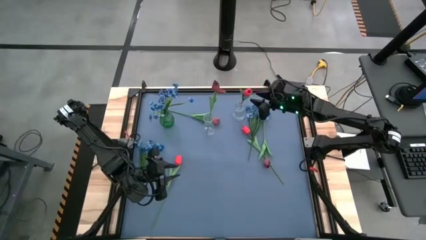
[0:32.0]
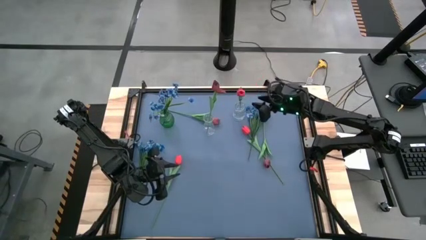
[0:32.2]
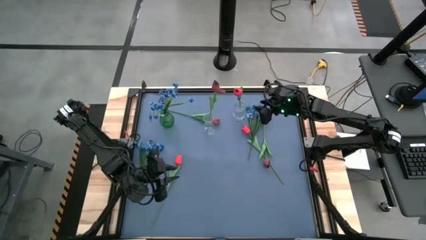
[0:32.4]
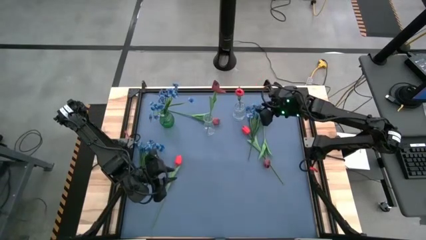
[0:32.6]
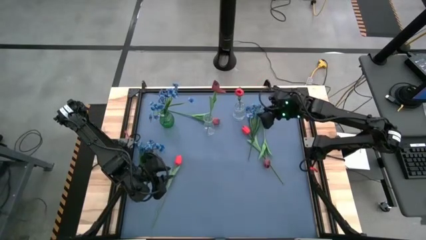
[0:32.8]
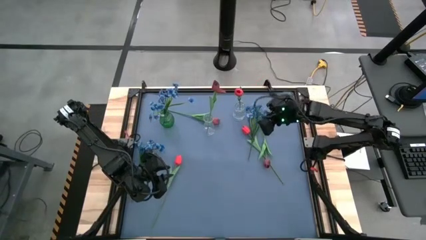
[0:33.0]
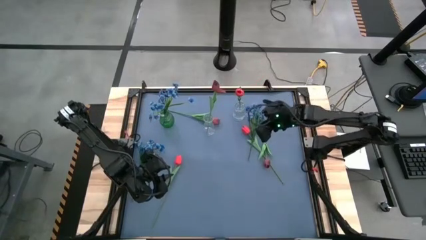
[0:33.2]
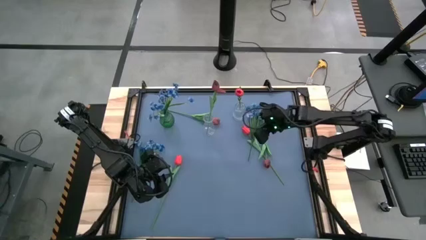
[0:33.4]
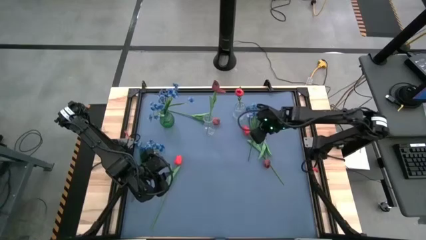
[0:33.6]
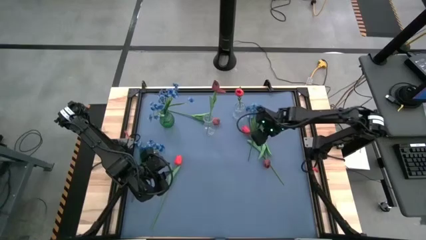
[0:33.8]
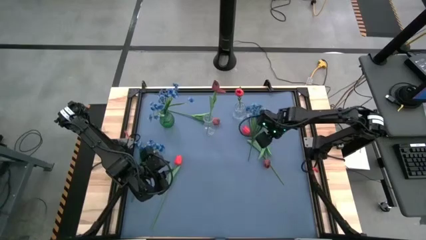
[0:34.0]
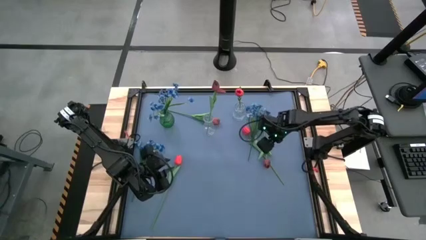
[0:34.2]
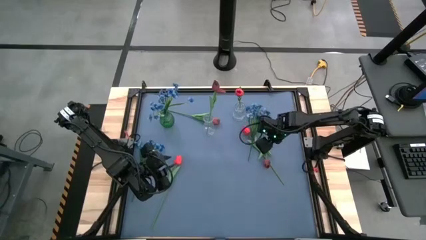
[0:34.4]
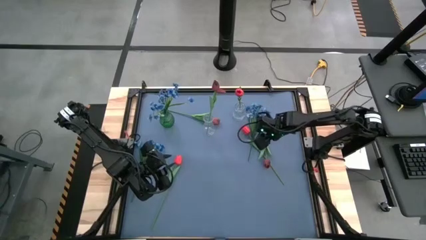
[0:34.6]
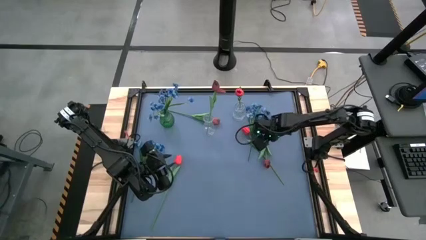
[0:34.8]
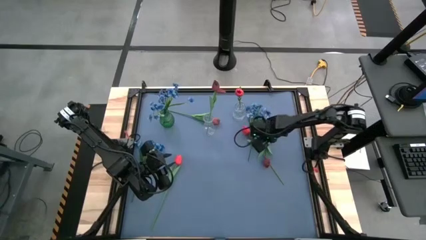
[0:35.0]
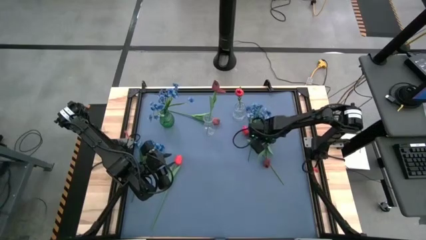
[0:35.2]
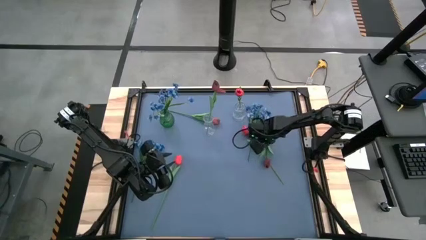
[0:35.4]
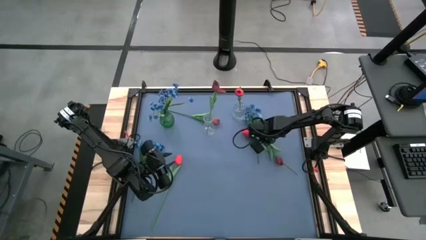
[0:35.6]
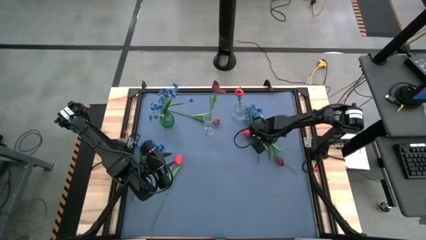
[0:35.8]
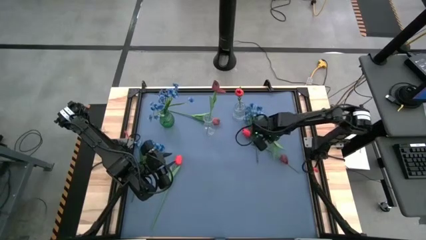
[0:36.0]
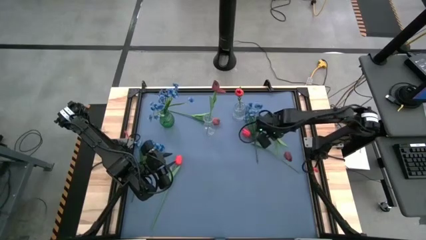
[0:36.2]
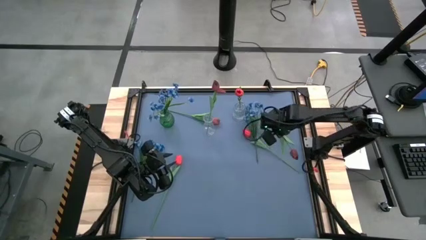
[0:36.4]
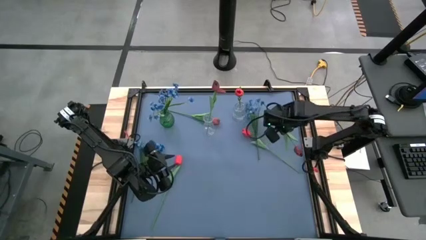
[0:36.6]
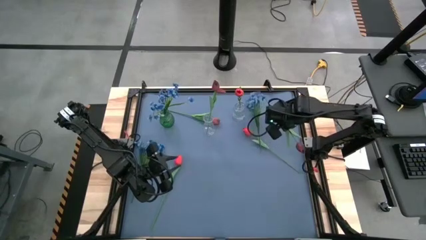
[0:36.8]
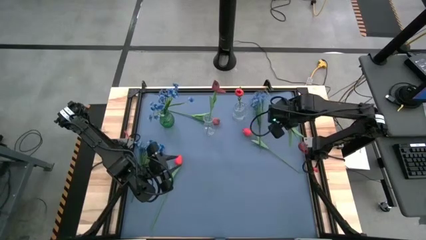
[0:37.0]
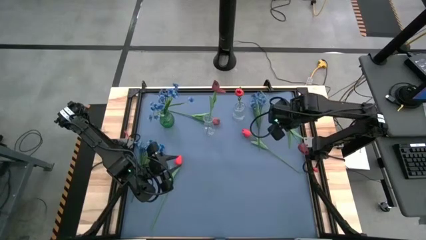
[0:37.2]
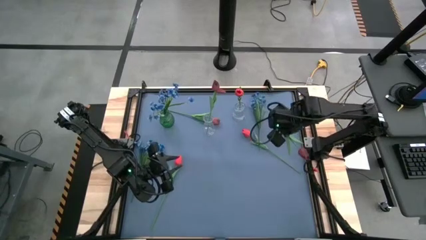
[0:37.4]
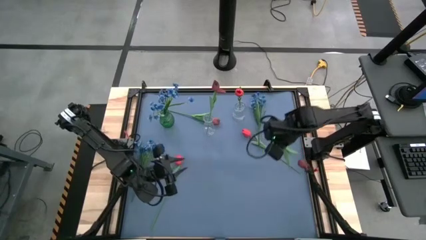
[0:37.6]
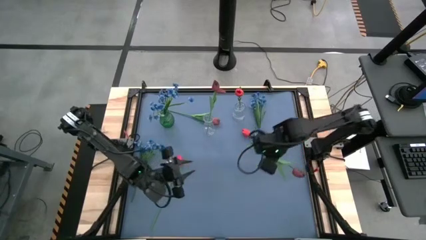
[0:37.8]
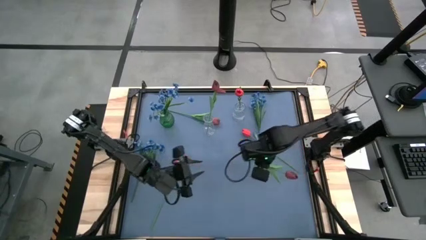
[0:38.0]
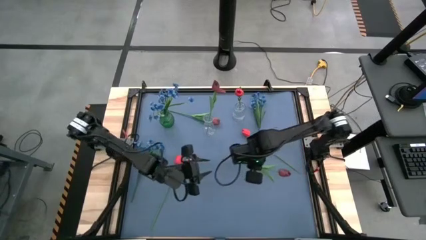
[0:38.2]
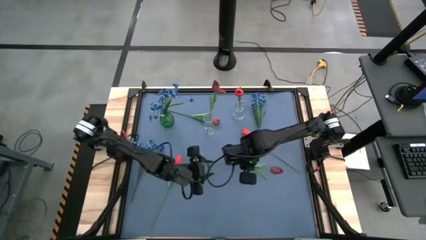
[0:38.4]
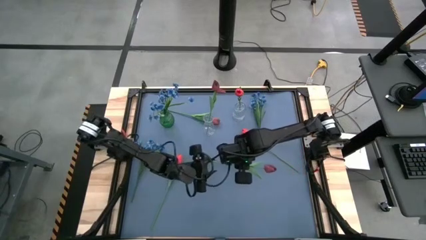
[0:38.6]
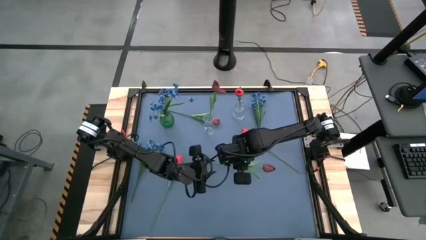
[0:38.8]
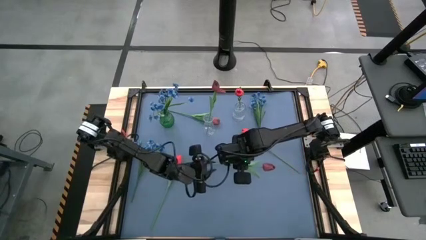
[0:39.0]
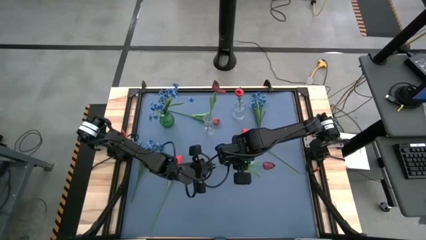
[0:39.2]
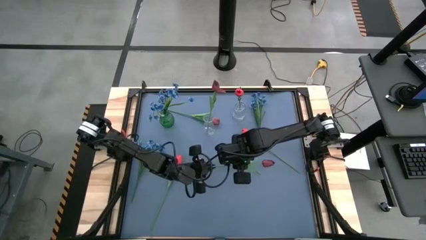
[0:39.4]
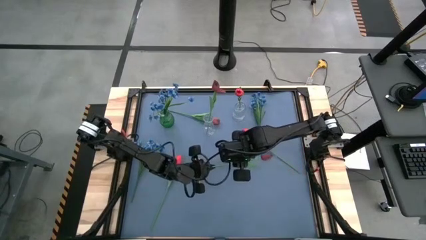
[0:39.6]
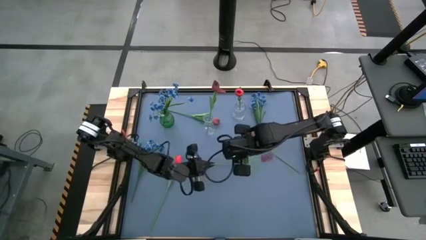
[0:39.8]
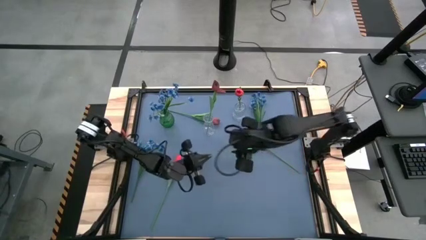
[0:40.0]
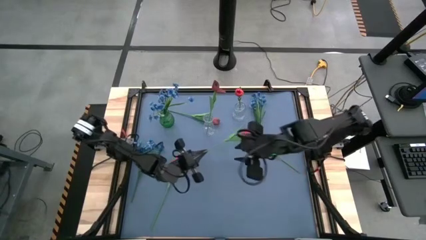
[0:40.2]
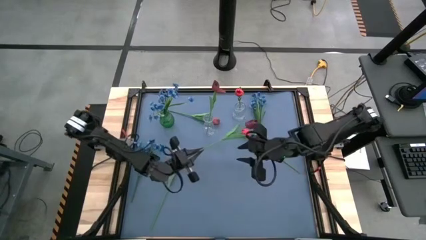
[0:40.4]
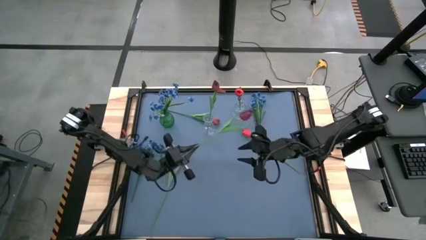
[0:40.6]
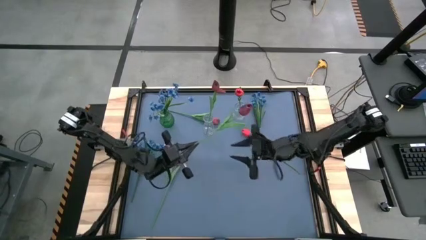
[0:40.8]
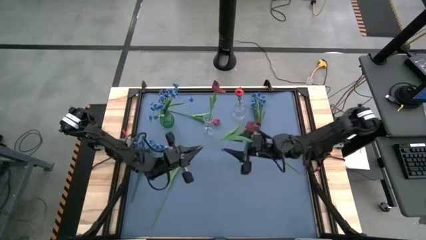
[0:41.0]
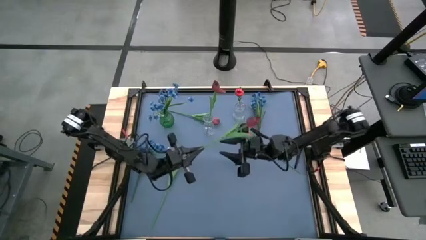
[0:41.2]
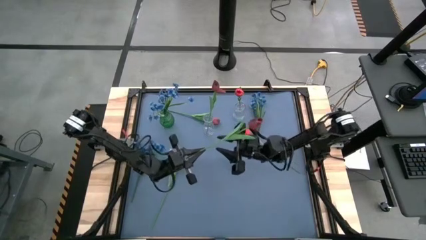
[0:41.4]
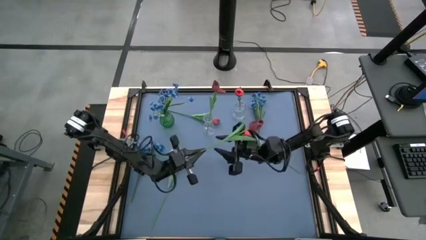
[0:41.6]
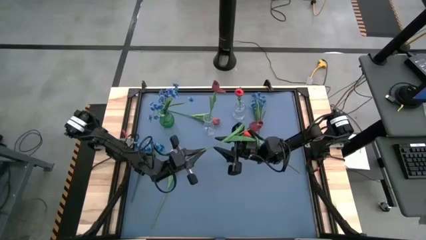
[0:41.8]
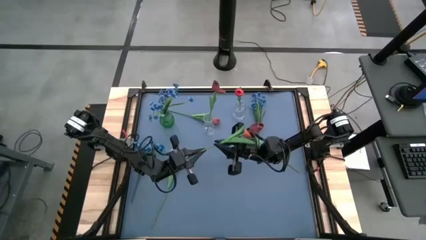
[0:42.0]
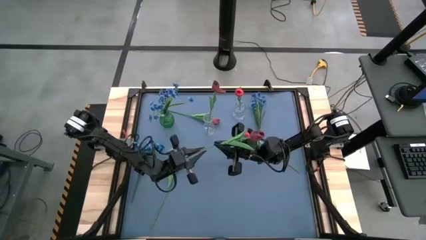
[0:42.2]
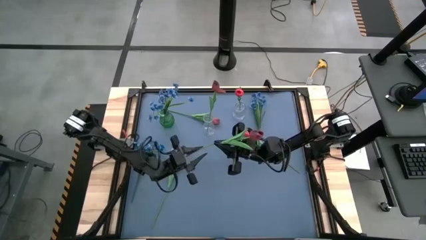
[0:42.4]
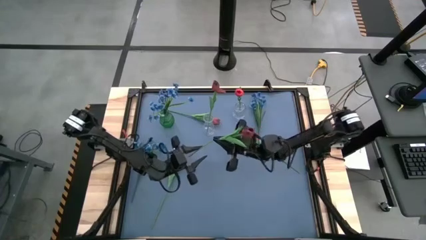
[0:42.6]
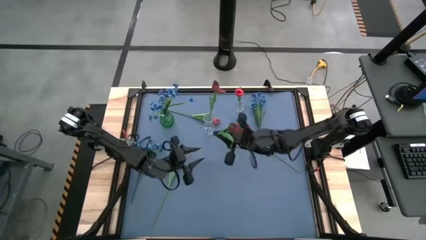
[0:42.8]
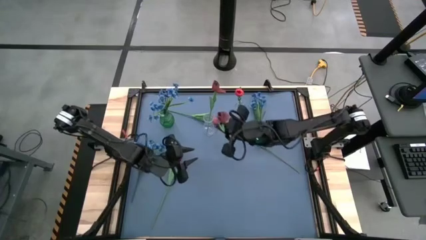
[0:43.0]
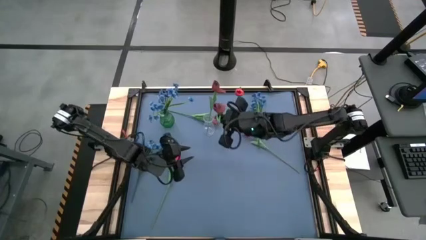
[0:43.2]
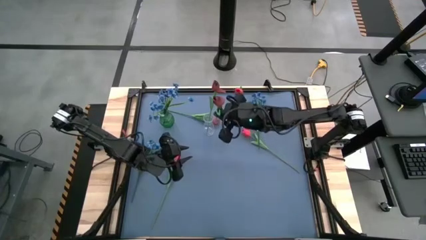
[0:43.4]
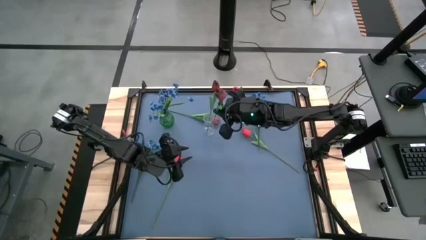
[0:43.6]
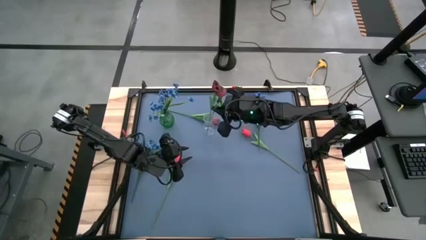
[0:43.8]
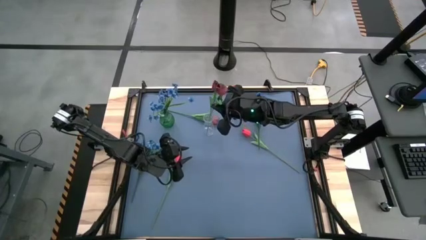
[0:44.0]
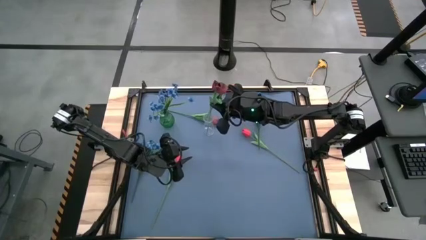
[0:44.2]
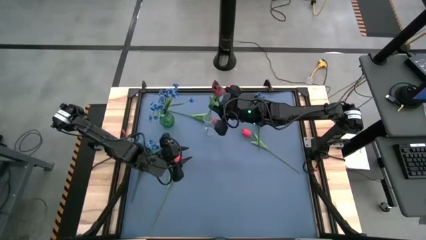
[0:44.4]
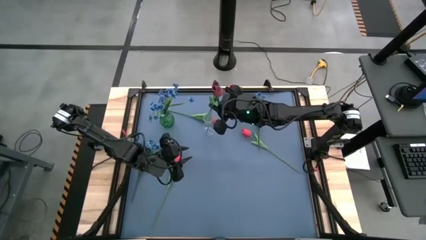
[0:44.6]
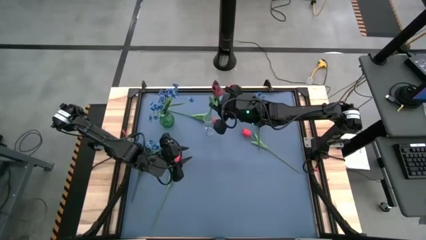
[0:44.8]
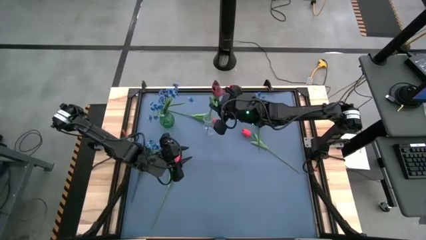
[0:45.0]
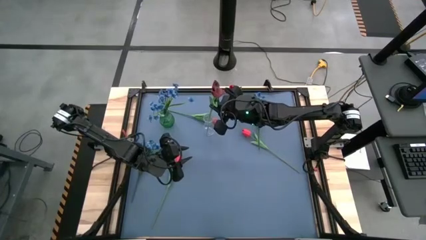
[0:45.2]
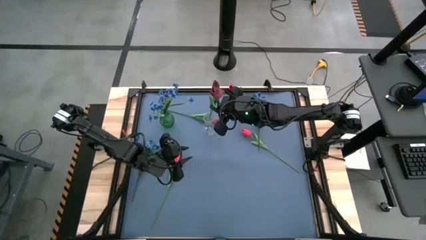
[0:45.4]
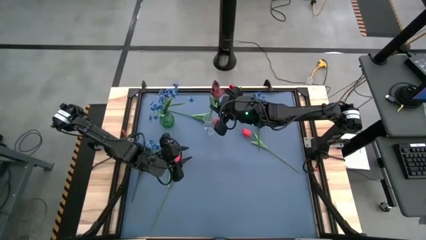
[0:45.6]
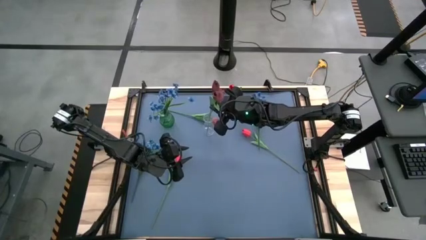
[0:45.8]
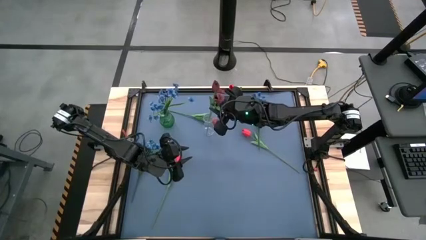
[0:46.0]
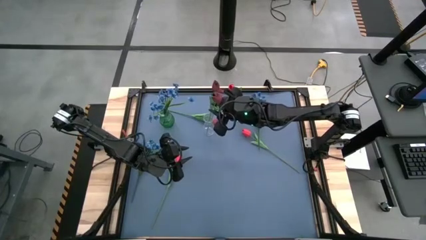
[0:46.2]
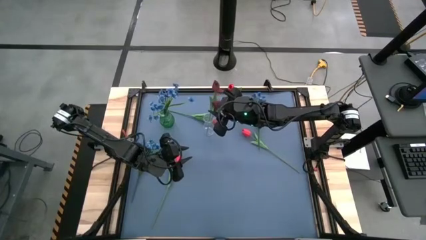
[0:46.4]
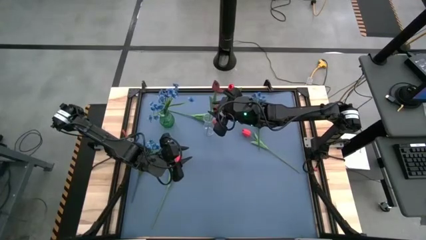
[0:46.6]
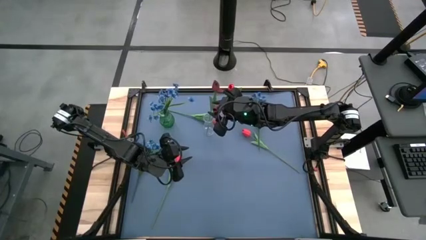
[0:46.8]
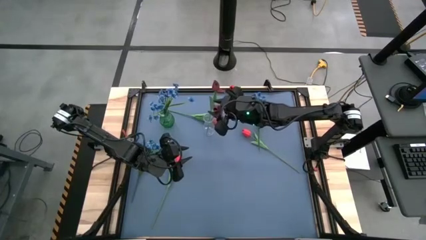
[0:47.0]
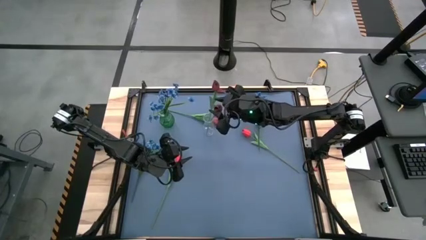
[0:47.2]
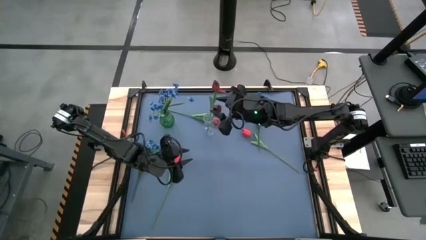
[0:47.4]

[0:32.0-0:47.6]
Task: Sort flowers into vase by color
Put the right dark red tulip into the bottom transparent vase
